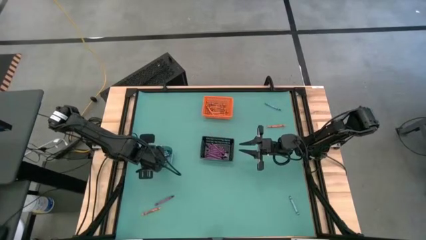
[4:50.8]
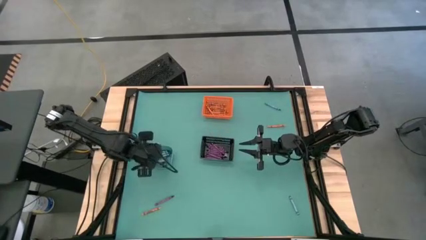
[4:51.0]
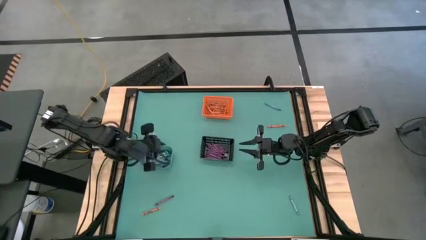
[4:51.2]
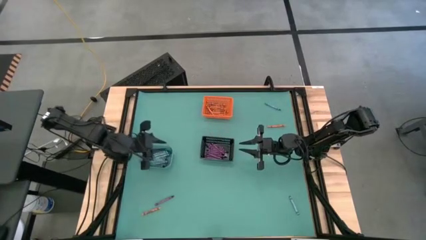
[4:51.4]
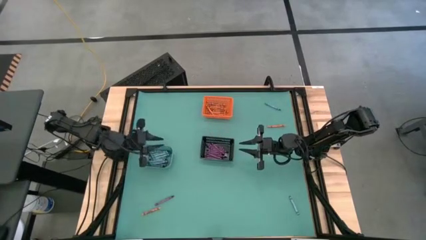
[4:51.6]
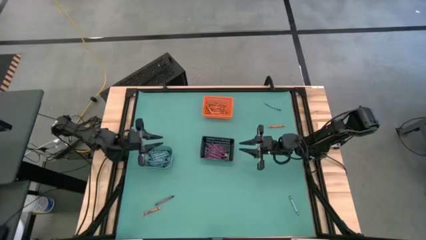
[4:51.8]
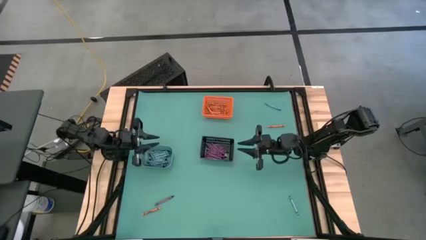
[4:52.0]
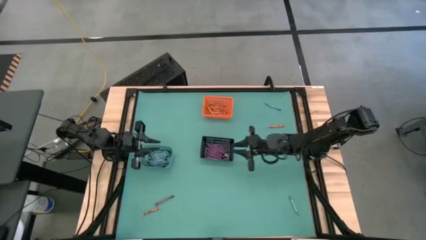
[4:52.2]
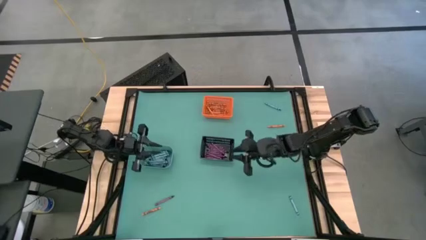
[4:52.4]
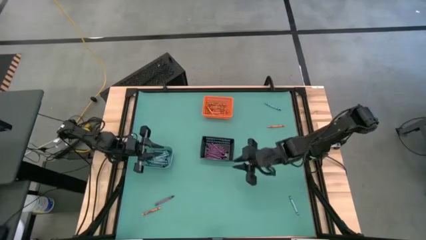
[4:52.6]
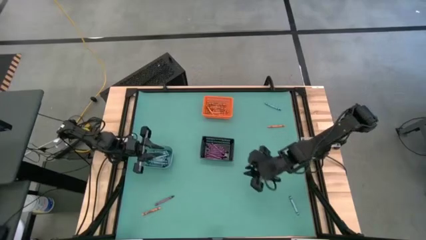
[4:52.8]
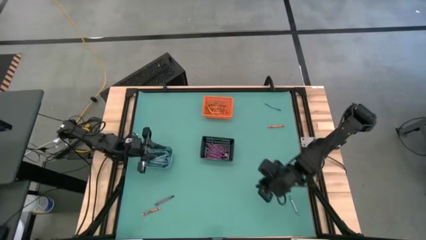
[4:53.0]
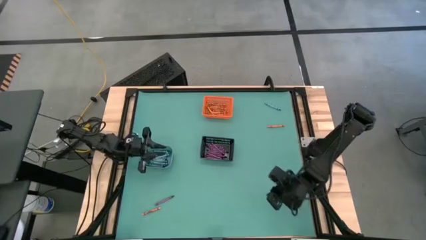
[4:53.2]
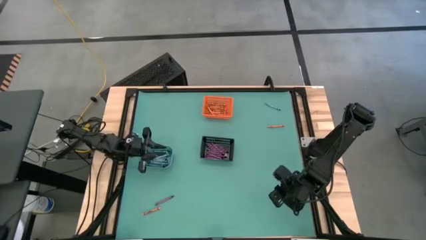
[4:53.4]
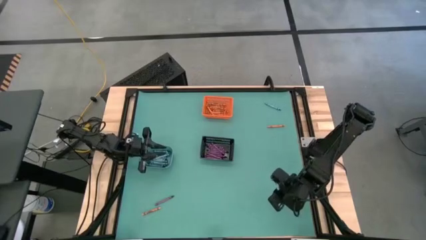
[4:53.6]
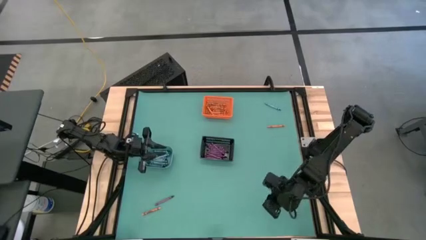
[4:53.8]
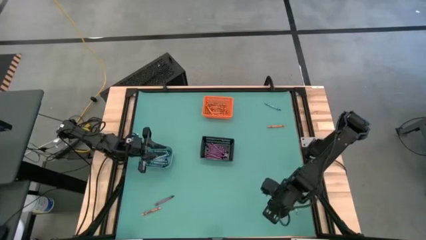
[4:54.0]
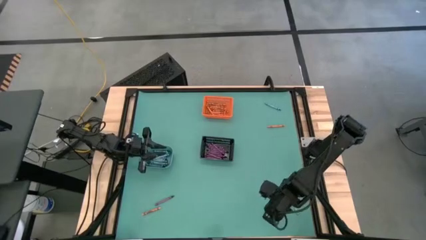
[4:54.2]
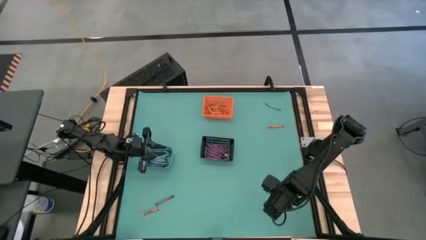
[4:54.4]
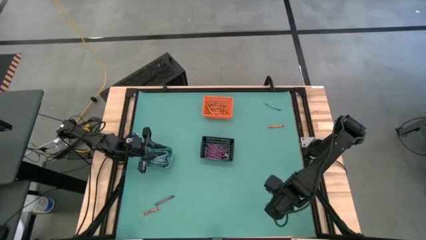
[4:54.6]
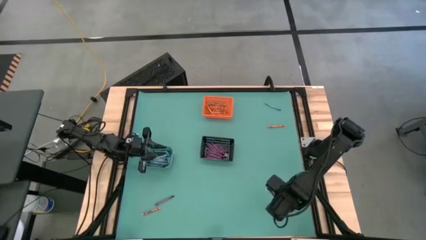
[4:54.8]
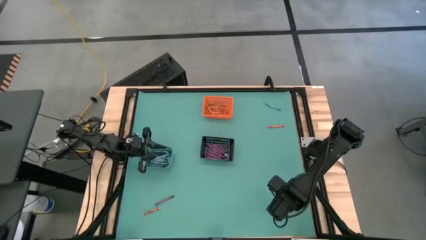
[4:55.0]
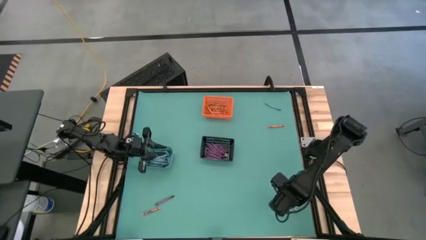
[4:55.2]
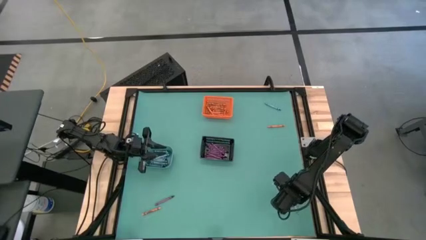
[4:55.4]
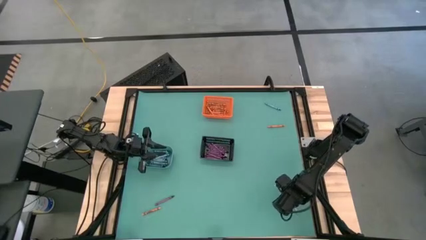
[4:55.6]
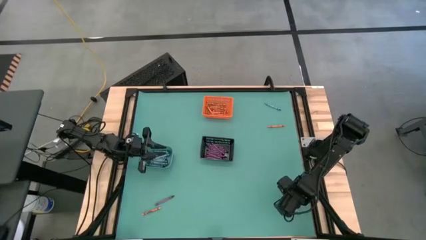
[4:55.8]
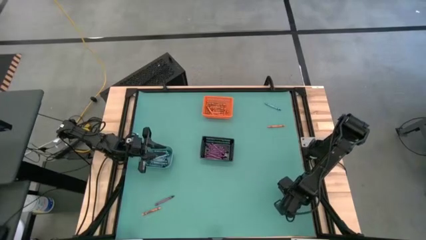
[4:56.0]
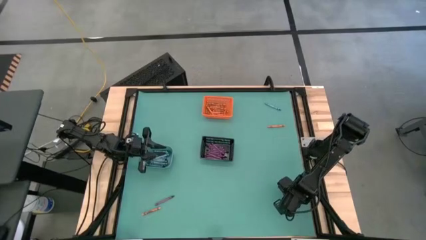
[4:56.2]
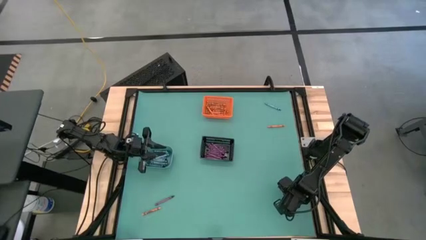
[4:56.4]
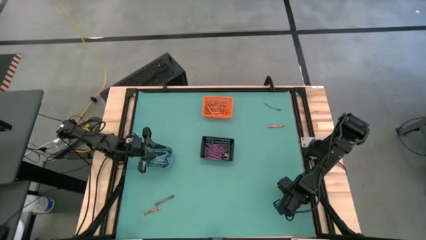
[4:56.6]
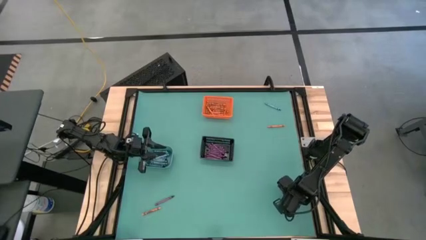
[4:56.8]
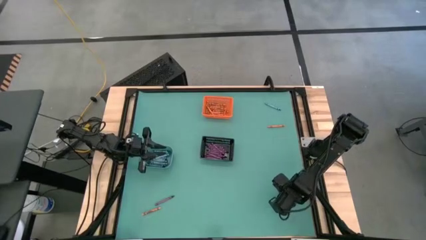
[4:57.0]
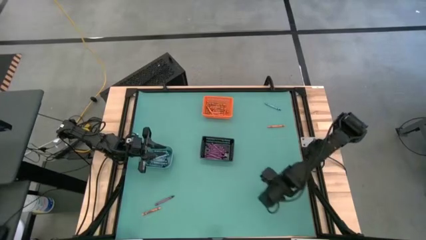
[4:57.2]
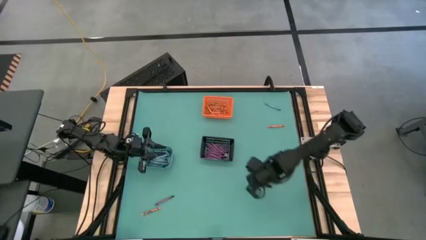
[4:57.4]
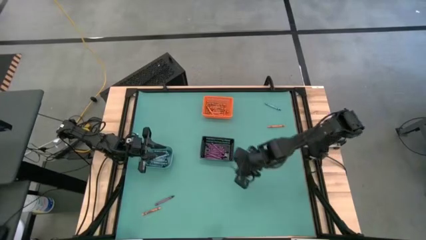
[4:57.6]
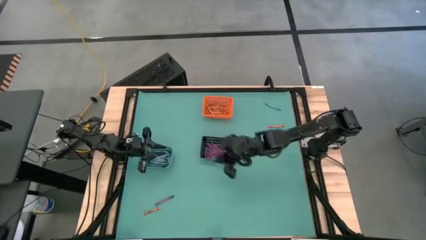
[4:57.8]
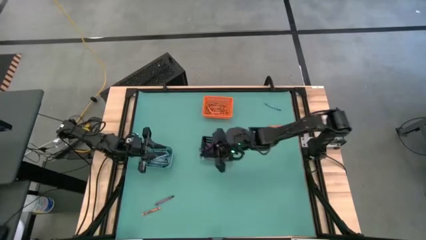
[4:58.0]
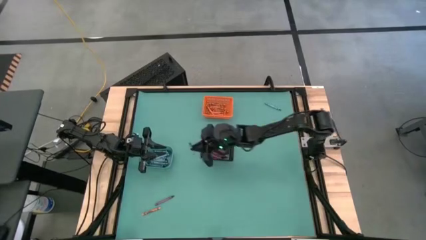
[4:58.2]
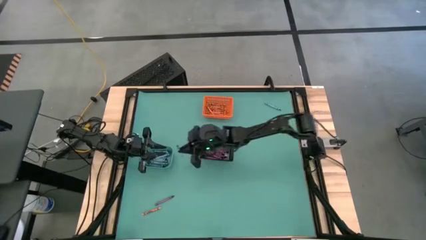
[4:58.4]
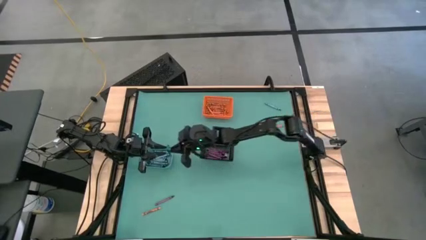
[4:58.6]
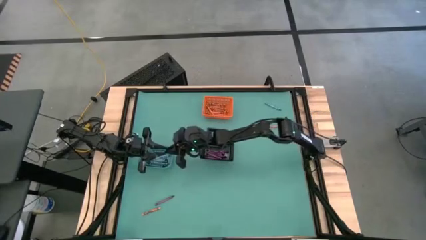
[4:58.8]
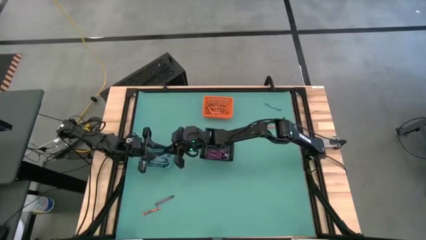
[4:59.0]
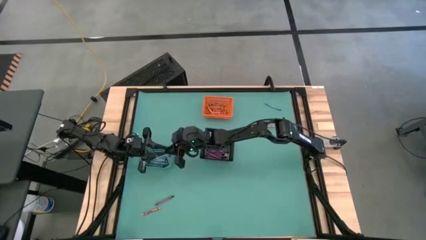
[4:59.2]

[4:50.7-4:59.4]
Task: Sort crayons
Put the blue crayon into the light blue bin

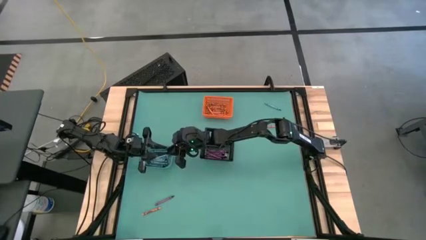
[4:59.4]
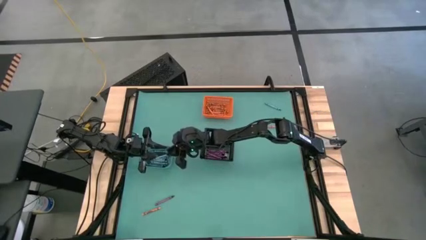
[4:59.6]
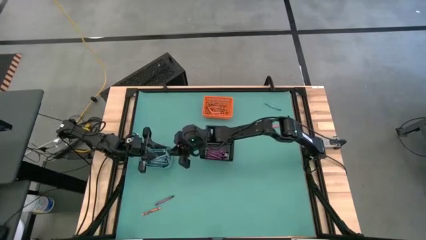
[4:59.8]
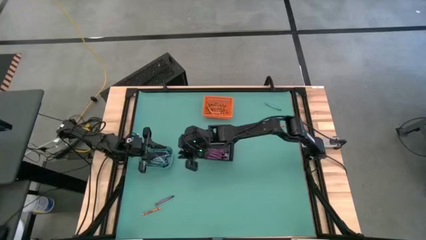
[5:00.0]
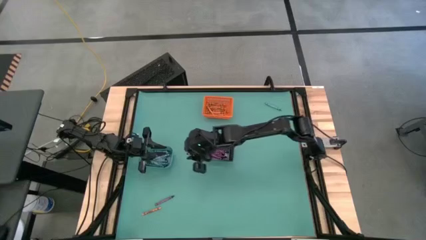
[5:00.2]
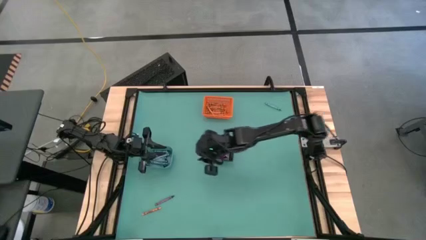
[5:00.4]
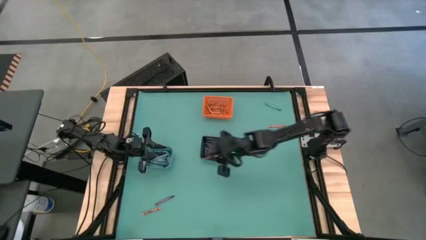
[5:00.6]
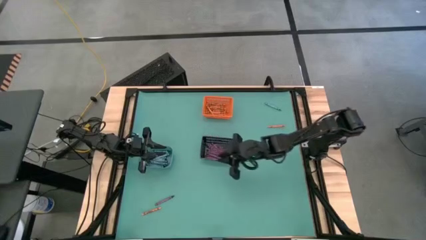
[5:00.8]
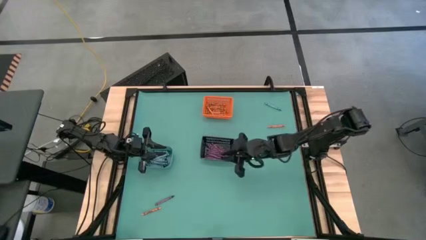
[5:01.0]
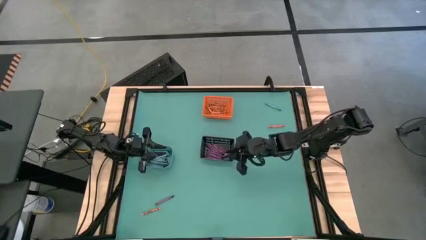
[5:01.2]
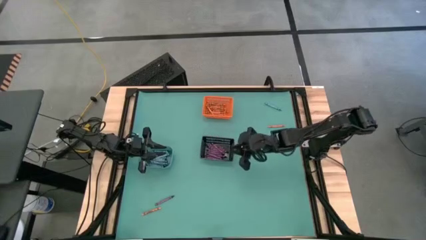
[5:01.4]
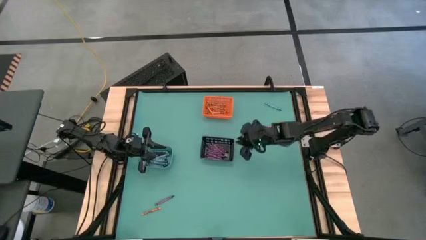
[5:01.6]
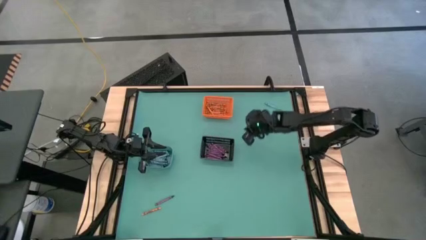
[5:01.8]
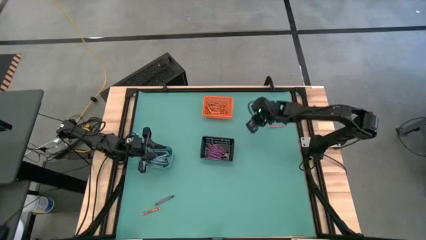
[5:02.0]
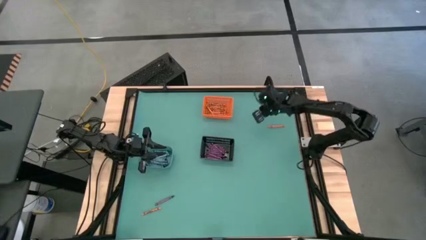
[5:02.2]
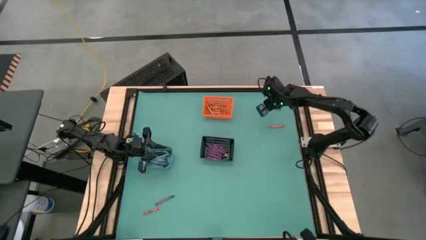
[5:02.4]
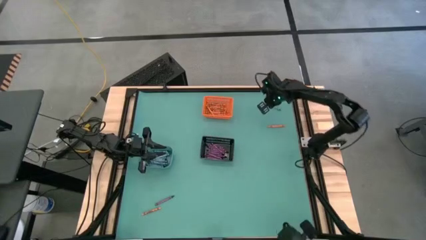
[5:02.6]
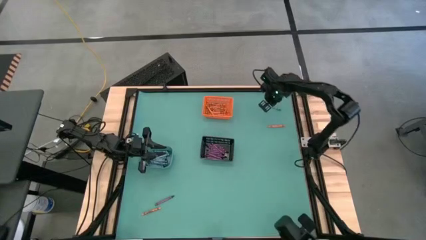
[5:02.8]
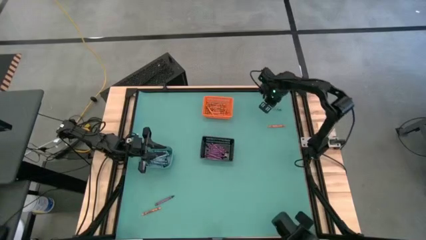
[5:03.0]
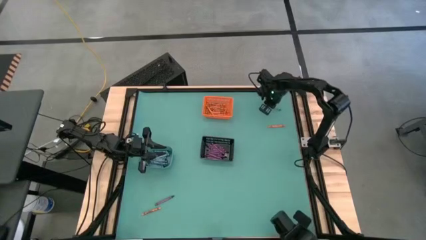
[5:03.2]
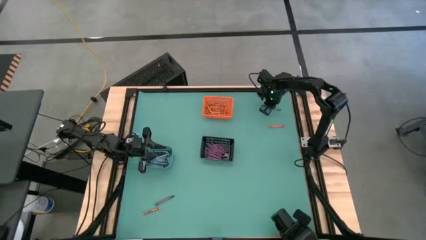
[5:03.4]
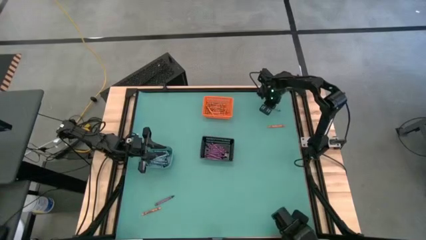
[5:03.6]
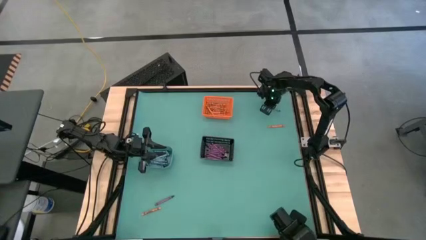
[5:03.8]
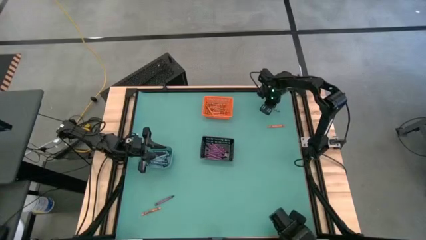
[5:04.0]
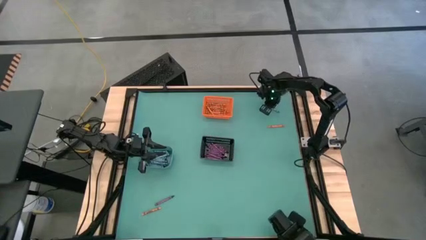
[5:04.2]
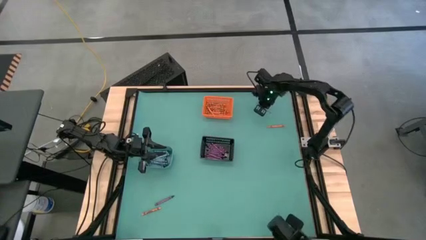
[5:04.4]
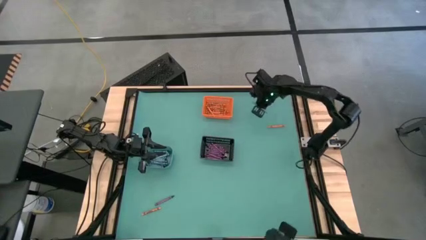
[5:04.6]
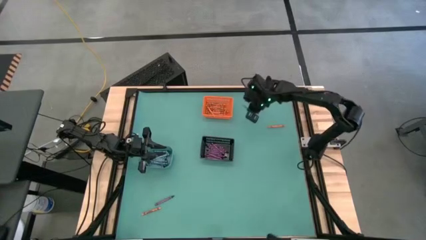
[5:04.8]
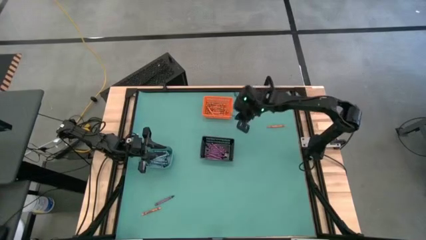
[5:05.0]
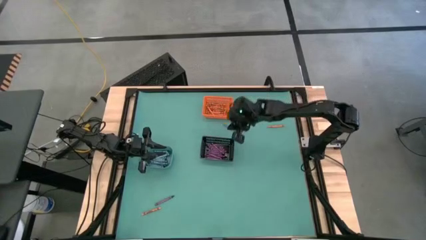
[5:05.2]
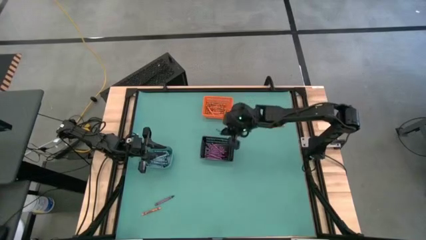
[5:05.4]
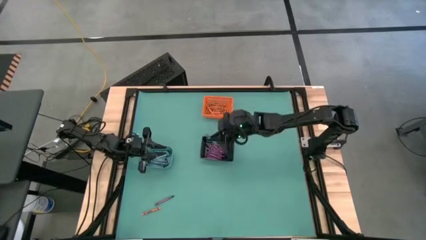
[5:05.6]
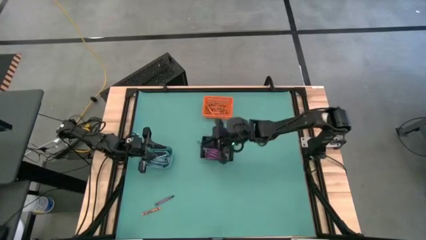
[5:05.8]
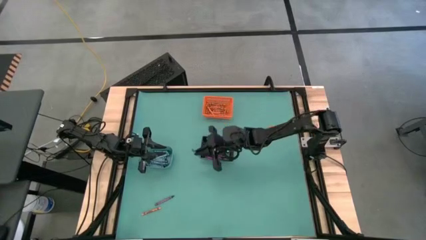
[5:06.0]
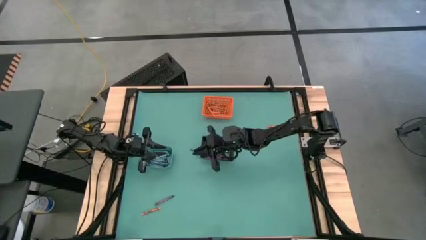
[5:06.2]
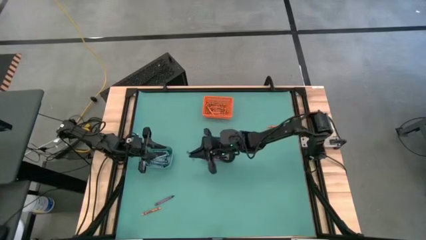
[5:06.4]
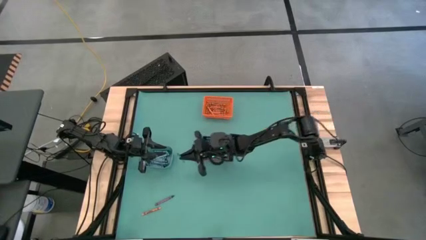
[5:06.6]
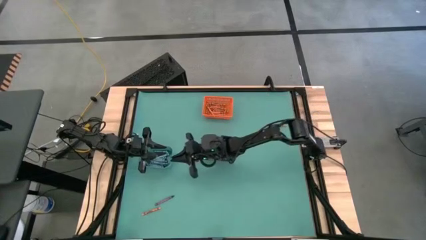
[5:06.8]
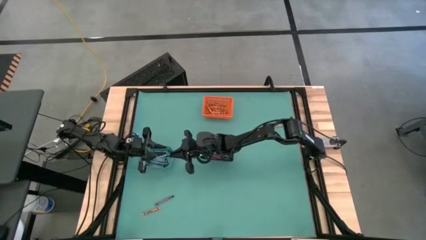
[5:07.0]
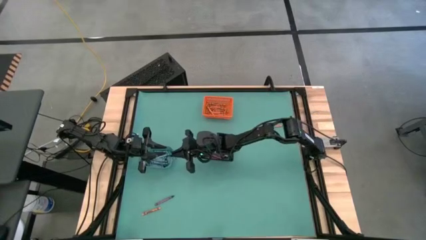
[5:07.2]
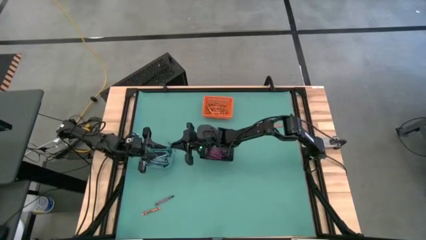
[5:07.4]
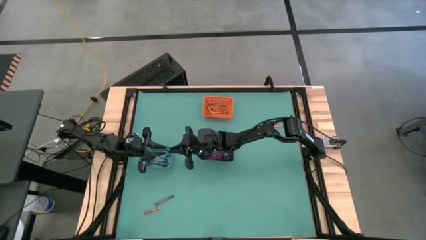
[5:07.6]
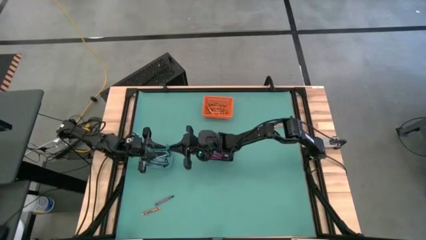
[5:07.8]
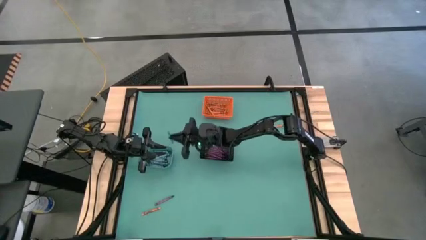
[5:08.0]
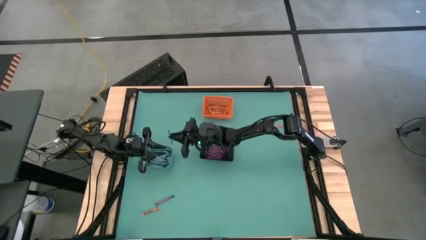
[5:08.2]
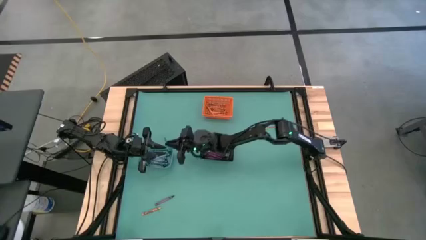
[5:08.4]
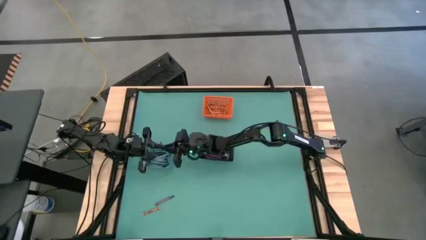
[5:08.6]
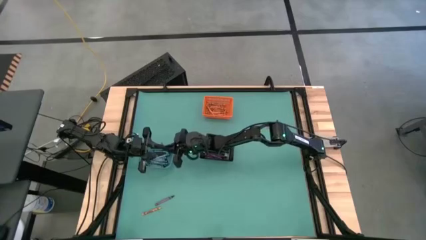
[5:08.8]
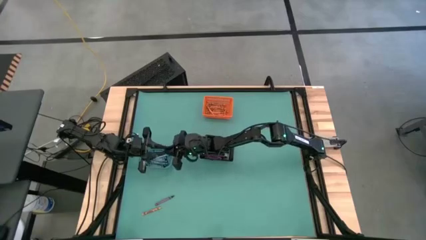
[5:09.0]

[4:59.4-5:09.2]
Put the blue crayon into the light blue bin
